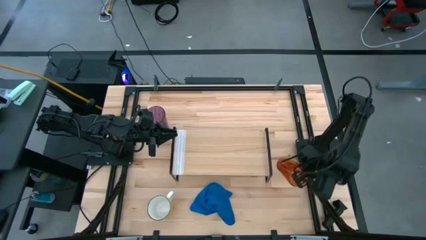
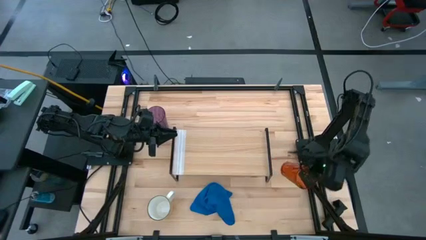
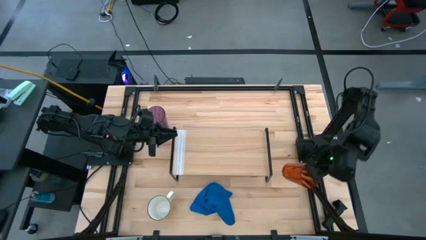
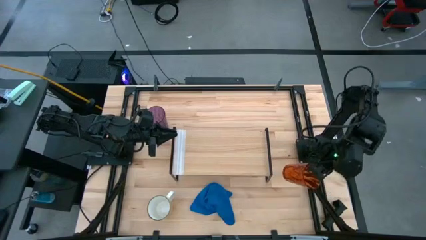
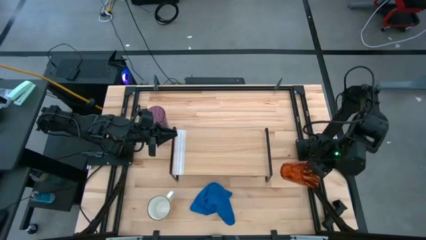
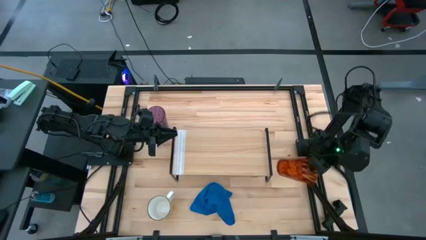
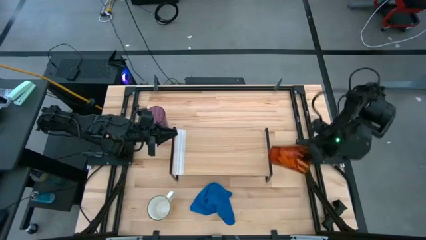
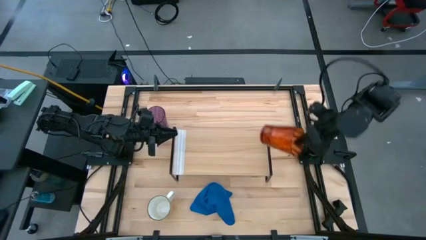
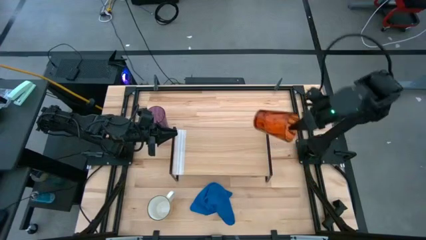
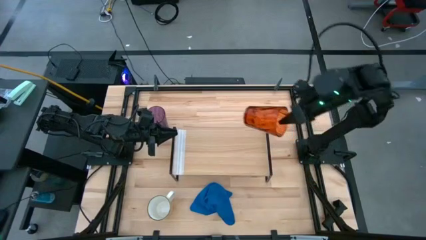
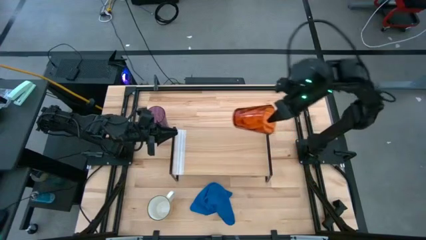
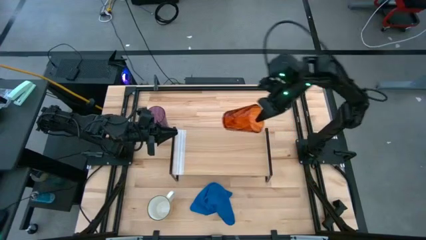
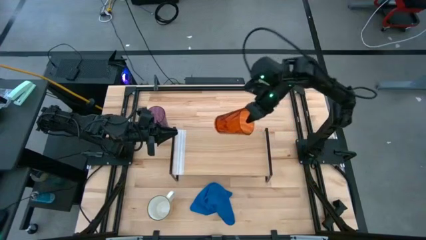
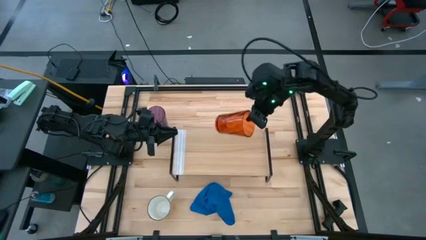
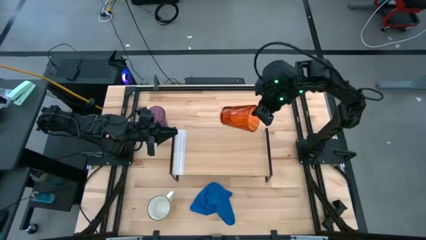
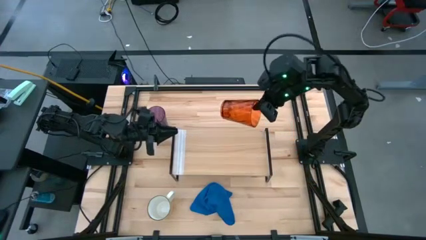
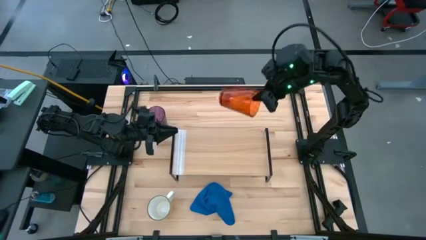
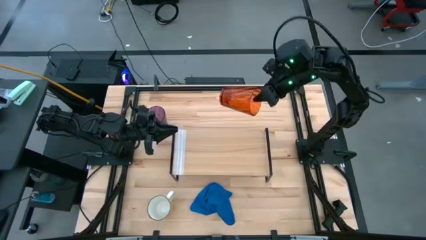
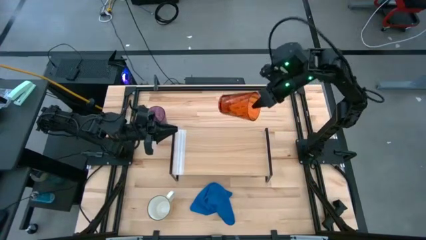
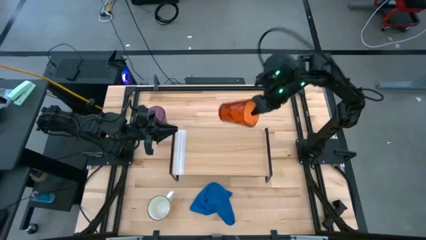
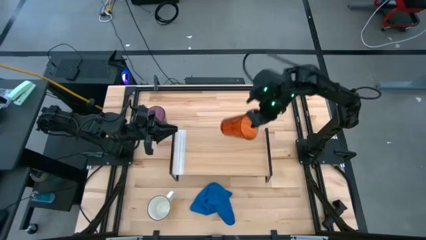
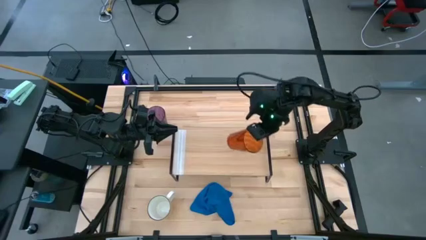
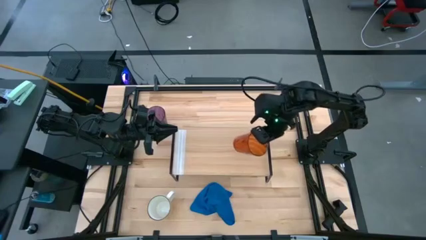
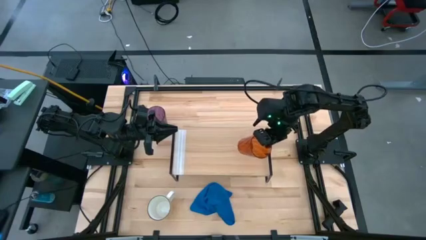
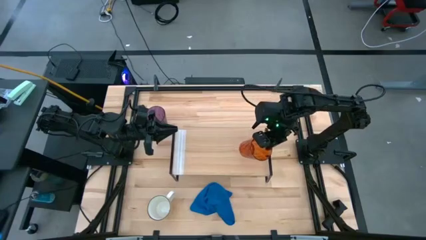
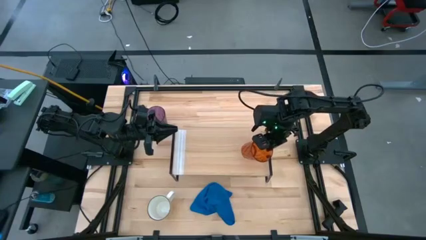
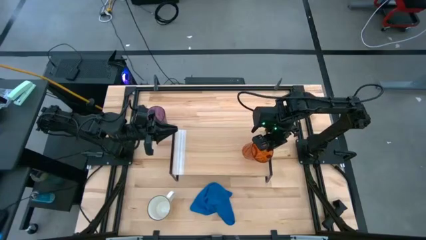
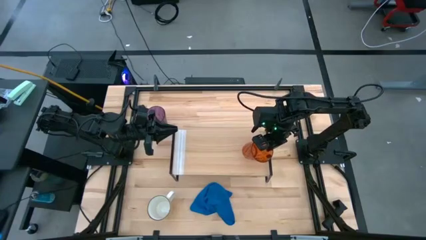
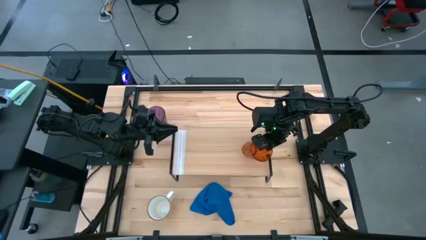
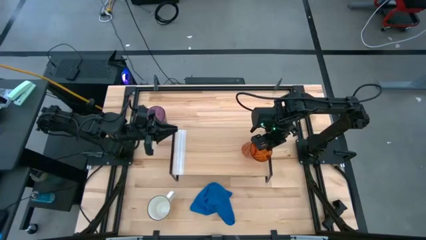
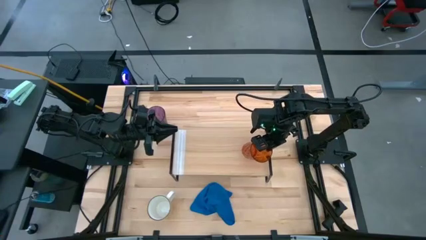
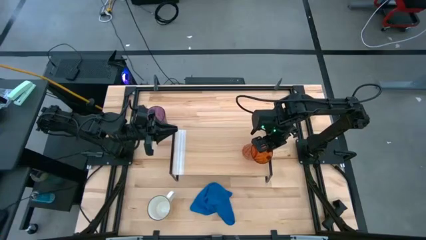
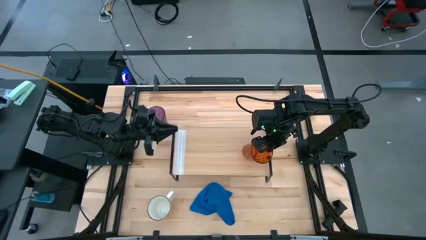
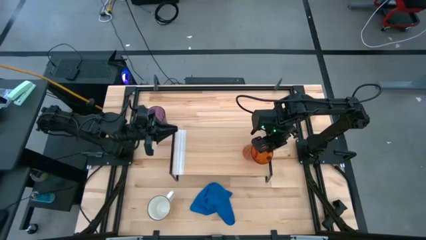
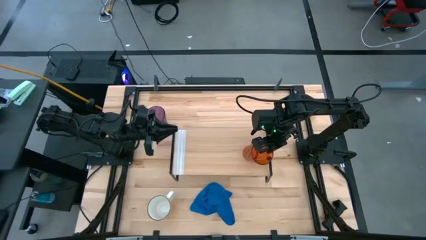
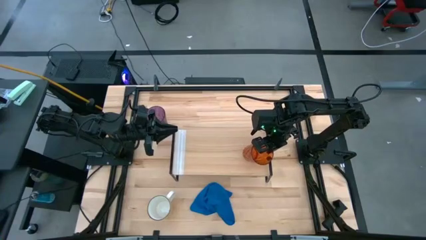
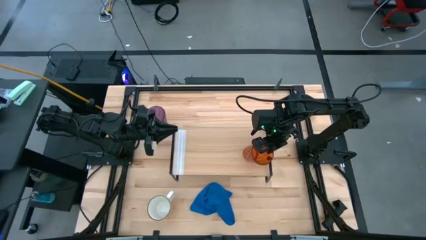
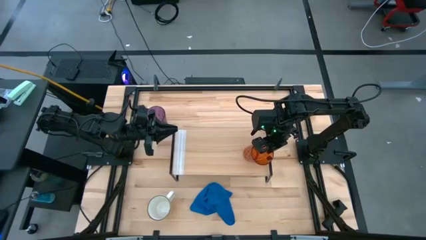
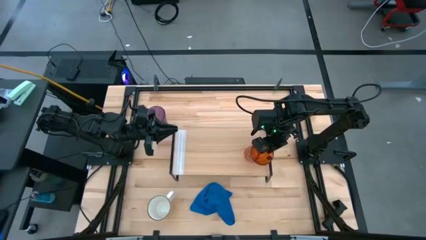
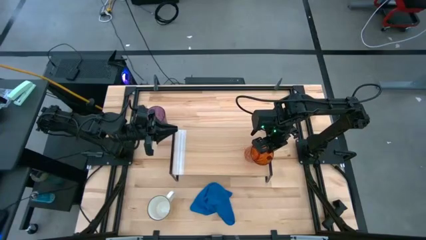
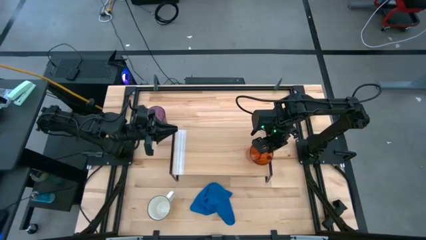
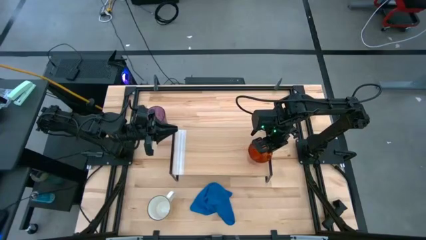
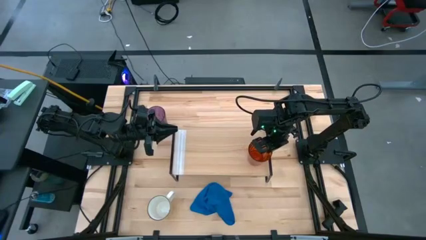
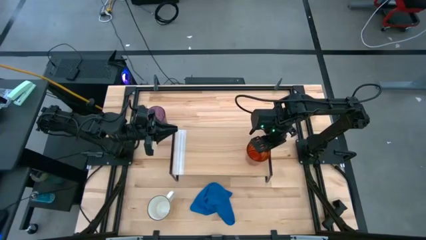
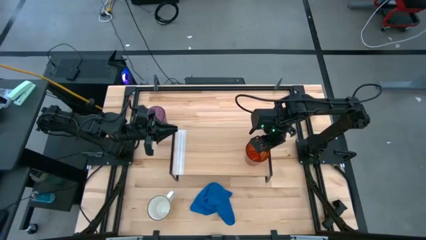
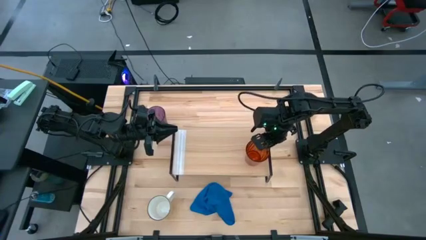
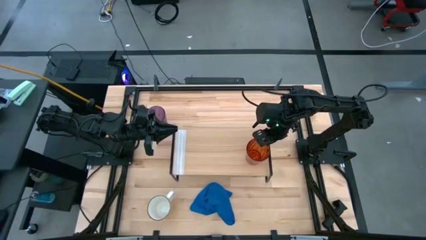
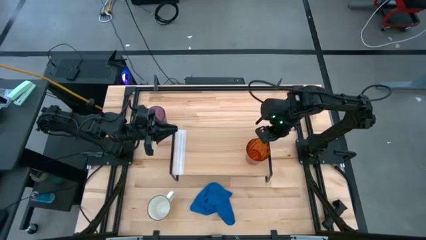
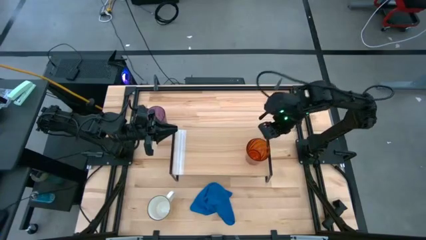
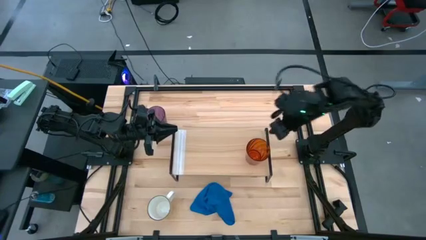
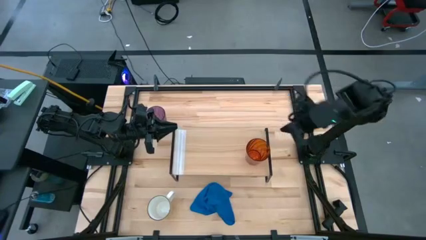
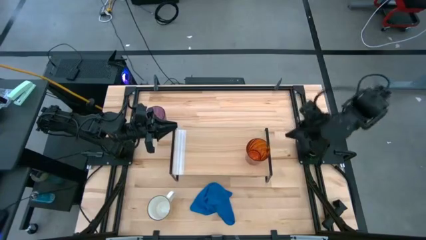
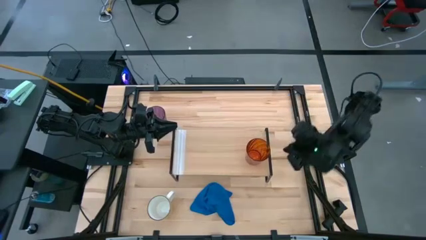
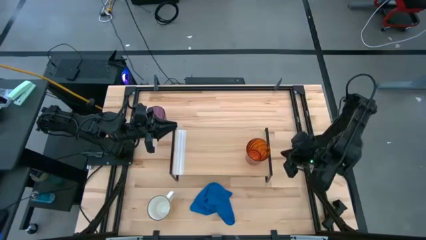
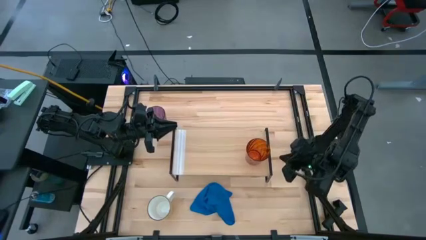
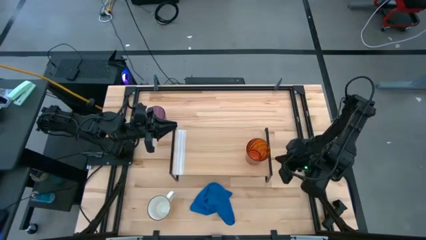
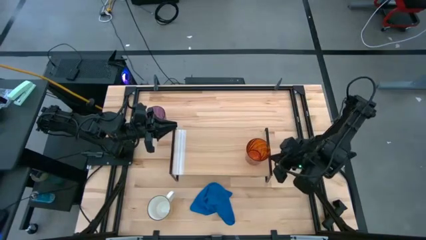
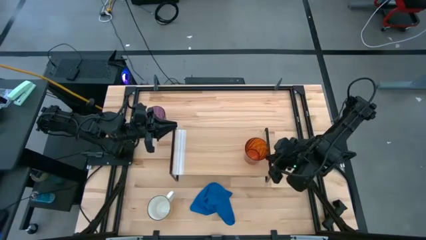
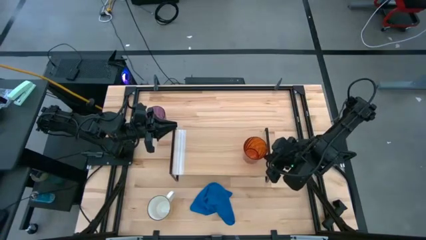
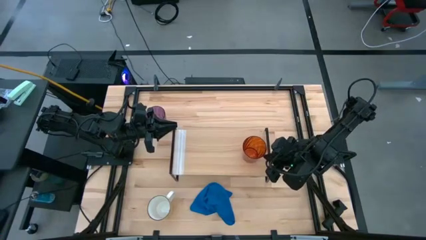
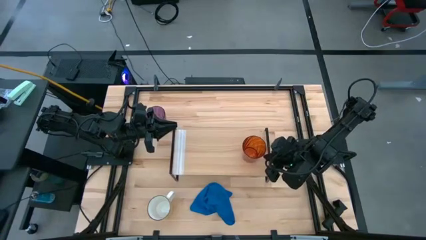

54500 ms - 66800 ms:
Task: Stack small to large cups/mugs on shelf
Put the orange cup on the shelf
